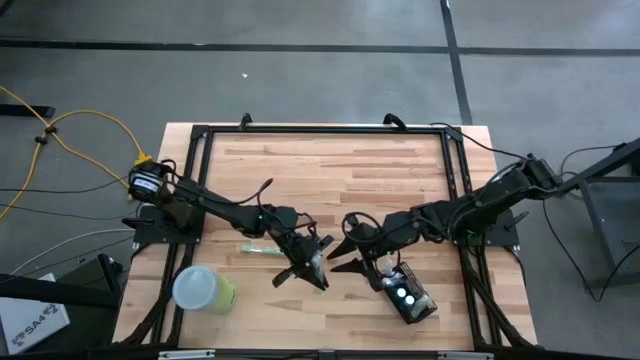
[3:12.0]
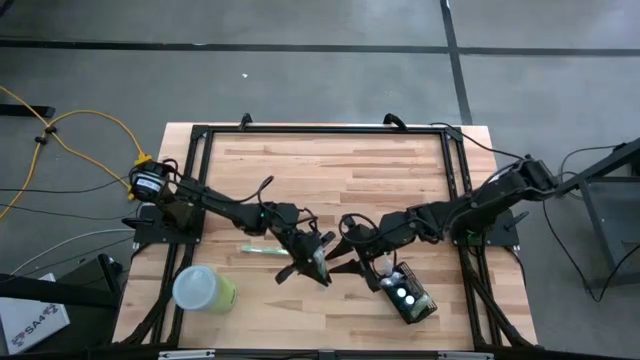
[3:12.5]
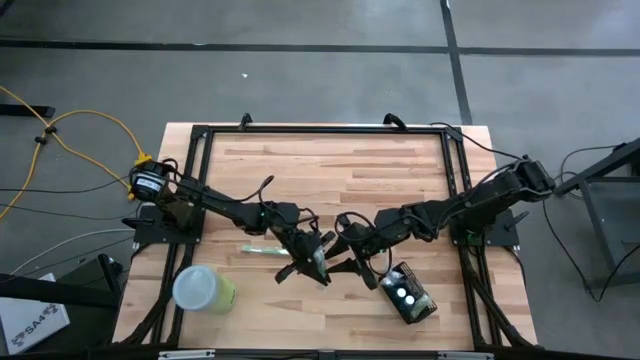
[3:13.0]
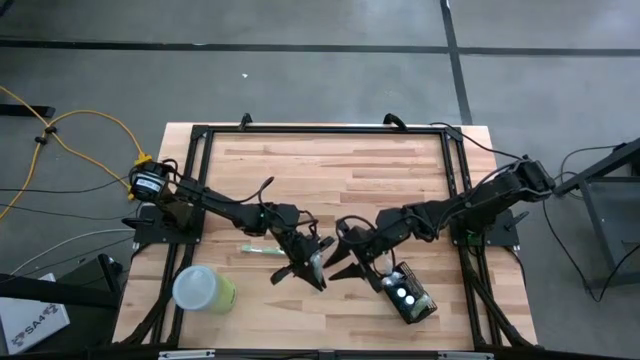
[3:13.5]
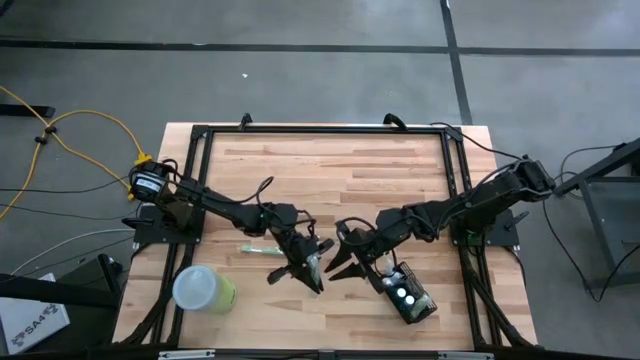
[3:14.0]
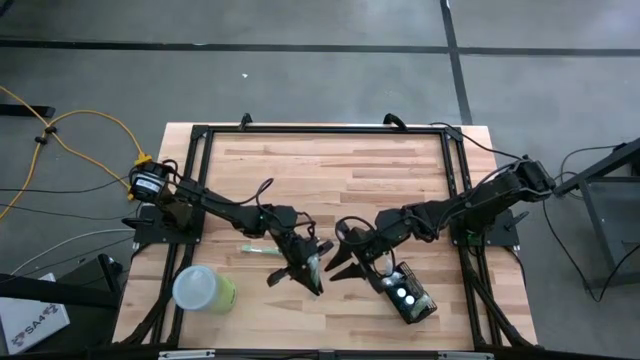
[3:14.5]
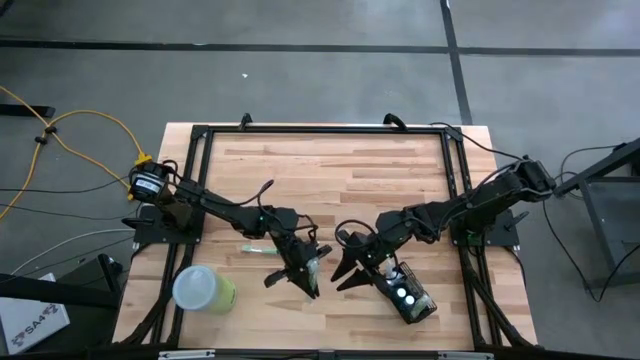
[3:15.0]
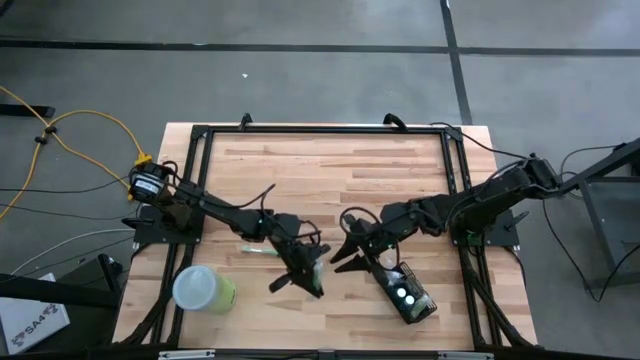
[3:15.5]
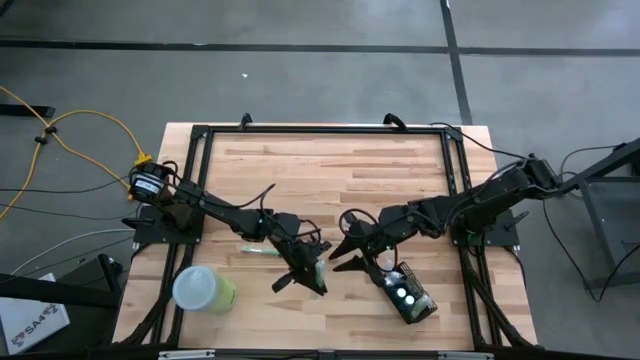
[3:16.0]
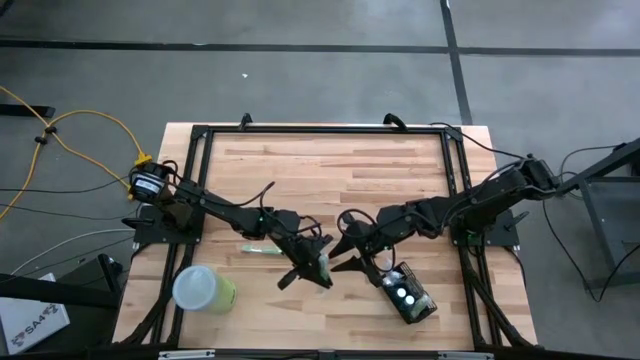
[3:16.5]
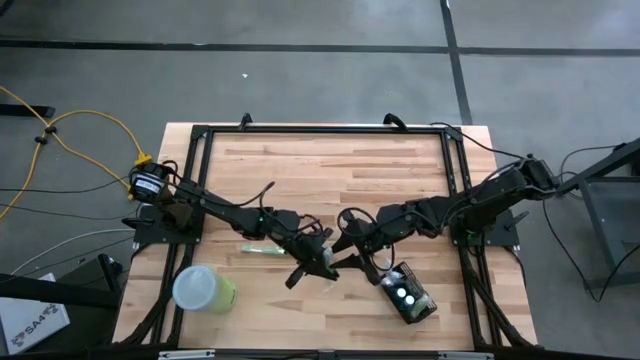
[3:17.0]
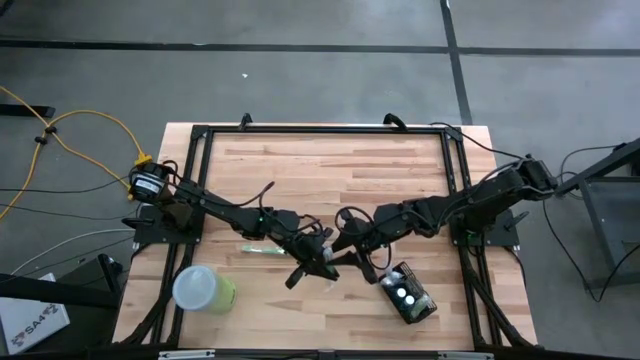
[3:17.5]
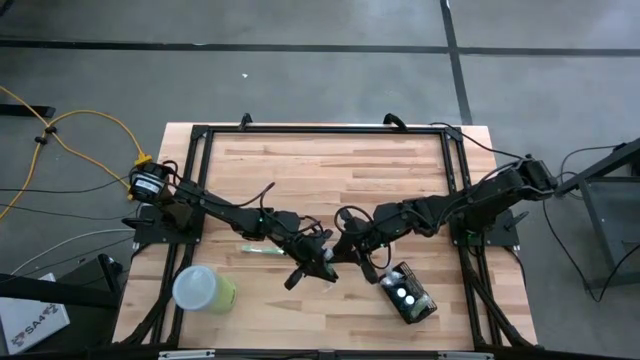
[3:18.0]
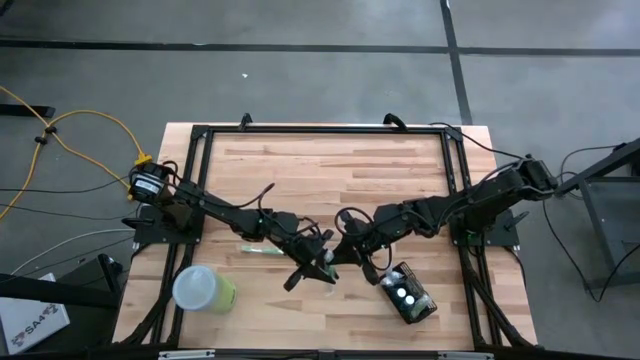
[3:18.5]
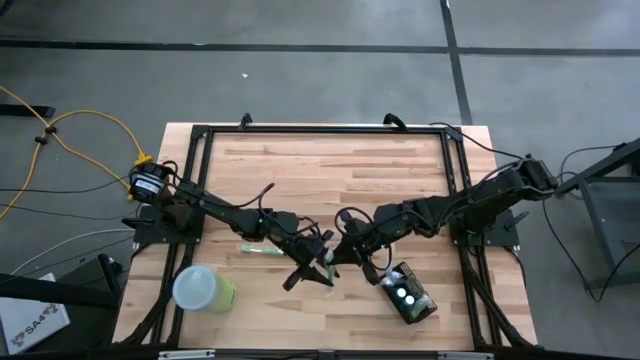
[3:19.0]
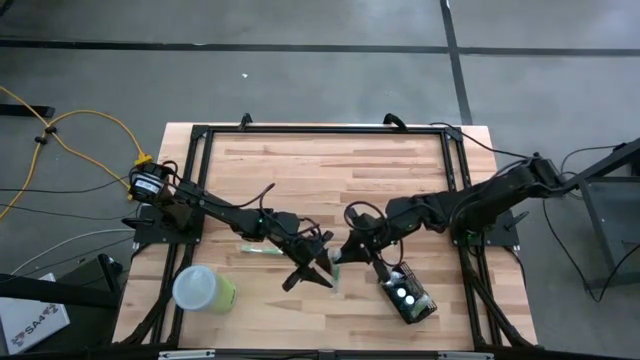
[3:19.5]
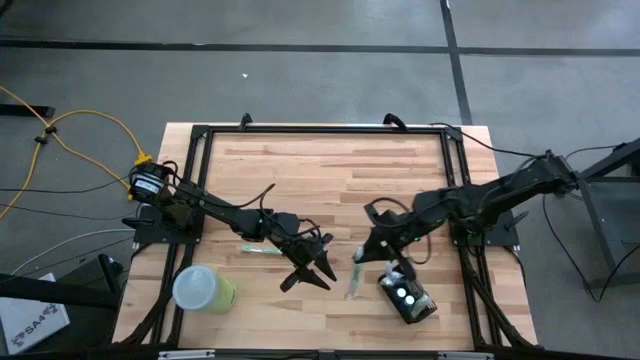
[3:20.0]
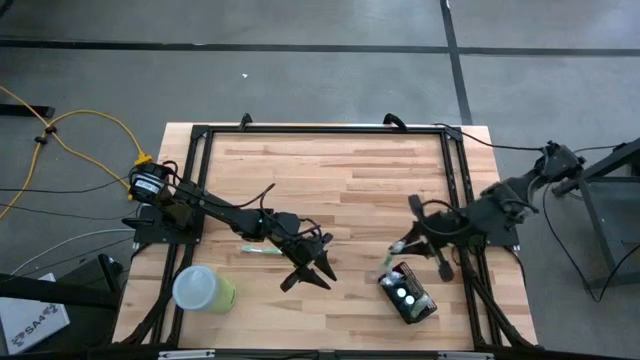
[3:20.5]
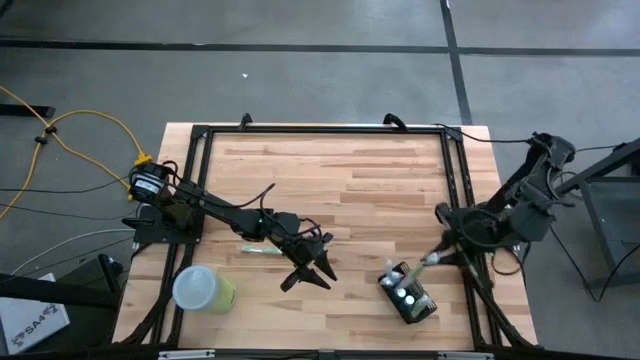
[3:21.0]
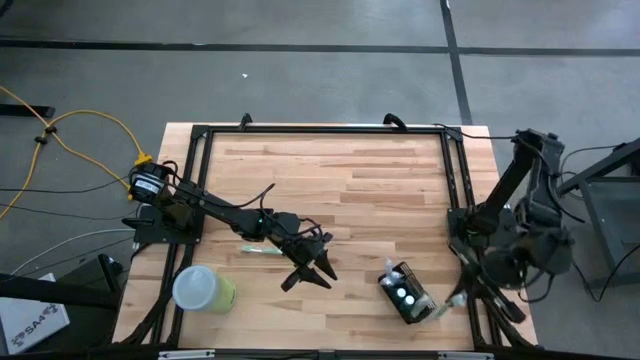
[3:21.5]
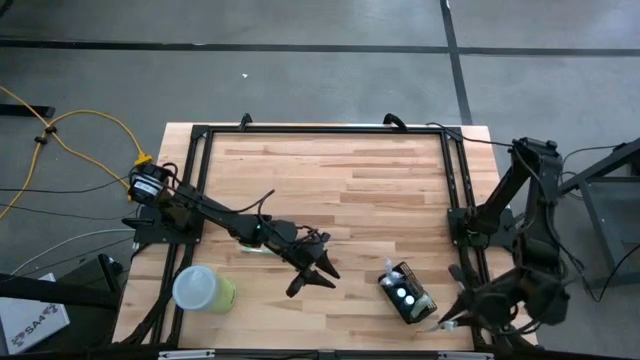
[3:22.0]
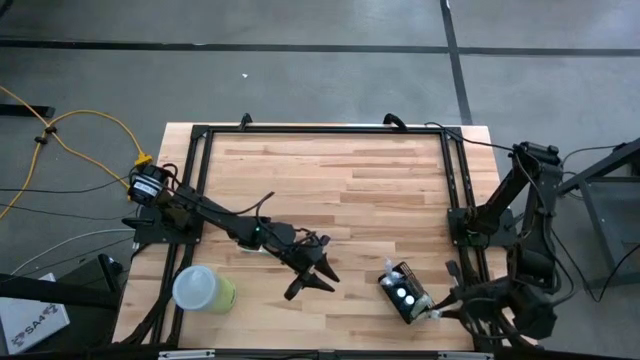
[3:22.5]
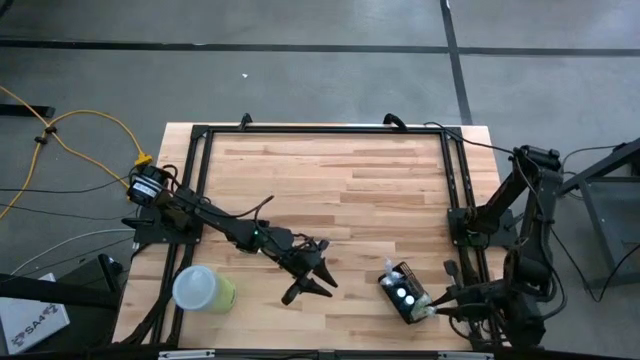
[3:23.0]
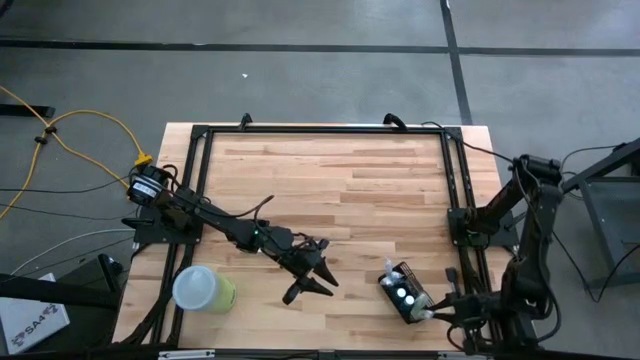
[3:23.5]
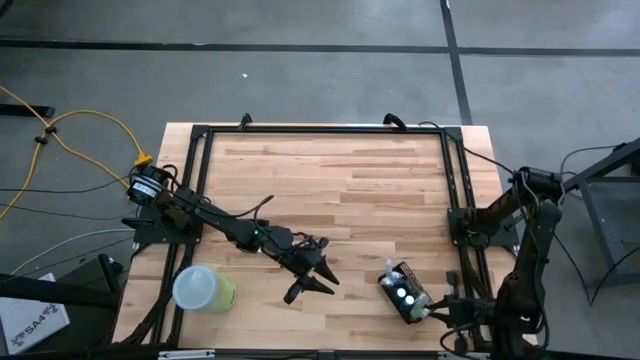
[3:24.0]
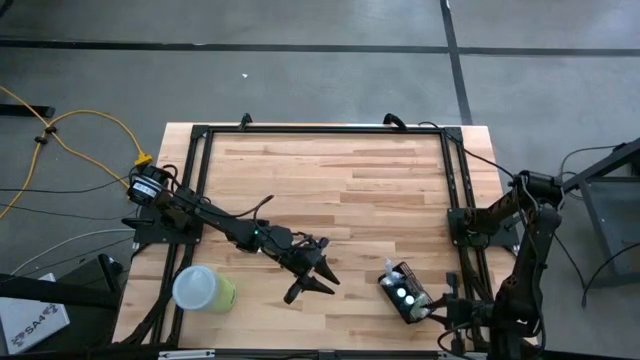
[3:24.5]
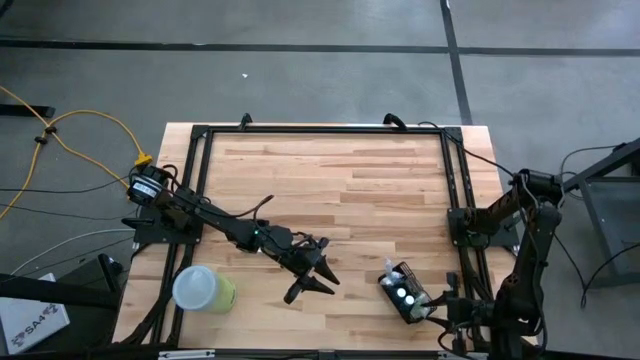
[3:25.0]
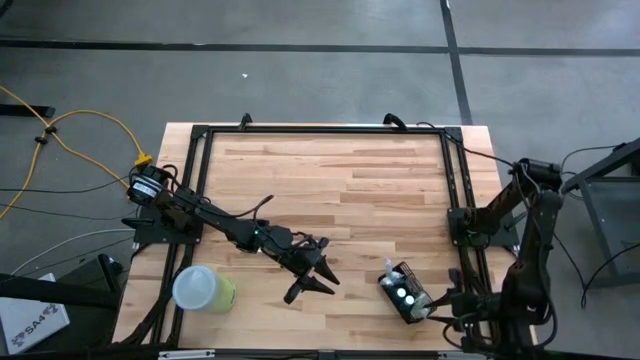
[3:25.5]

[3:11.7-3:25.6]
Task: Pick & Place toothbrushing station
Put the top green toothbrush into the bottom section of the black wire organizer

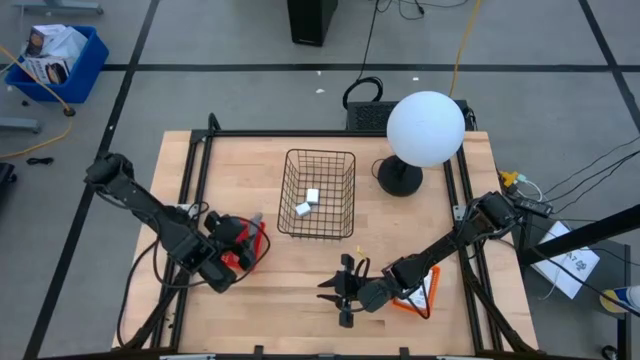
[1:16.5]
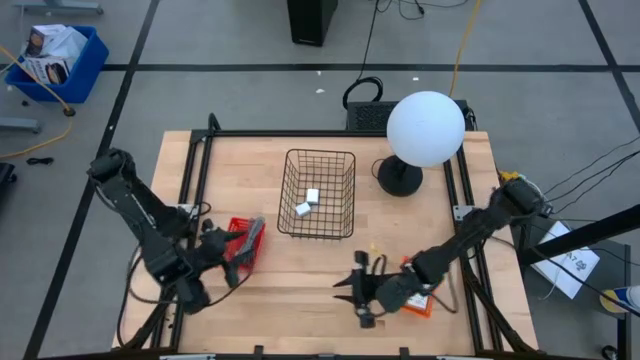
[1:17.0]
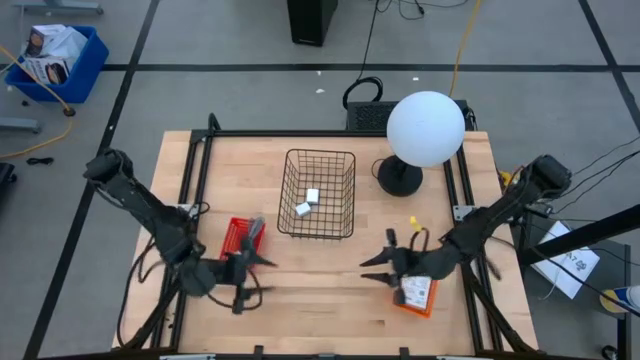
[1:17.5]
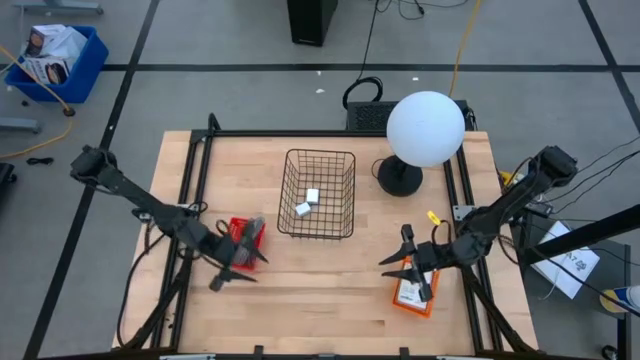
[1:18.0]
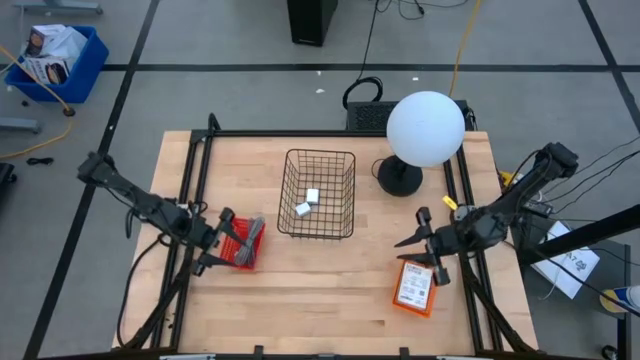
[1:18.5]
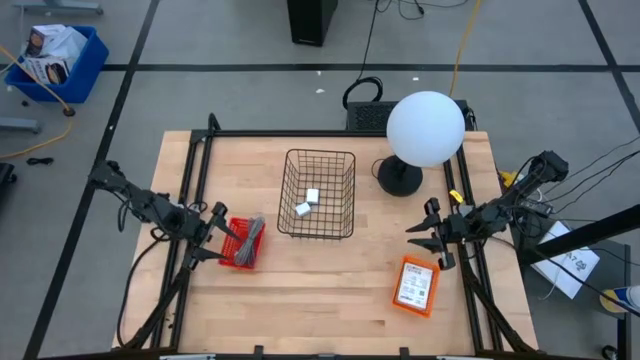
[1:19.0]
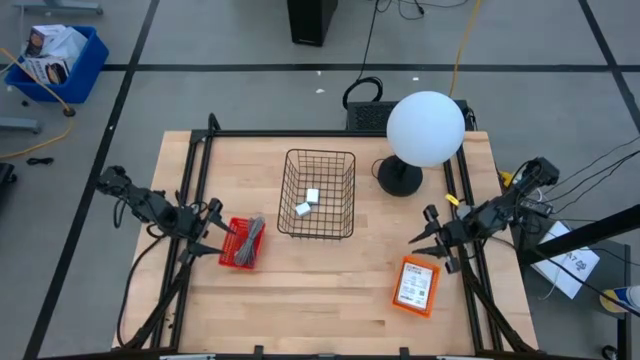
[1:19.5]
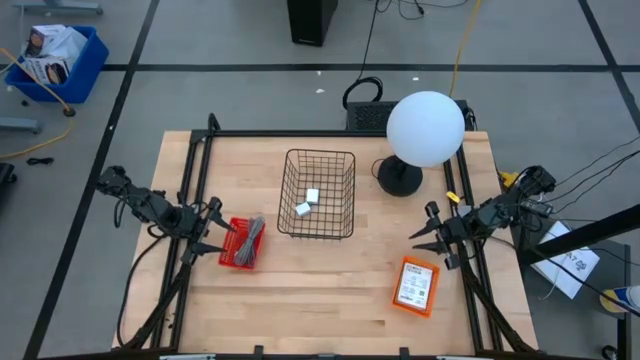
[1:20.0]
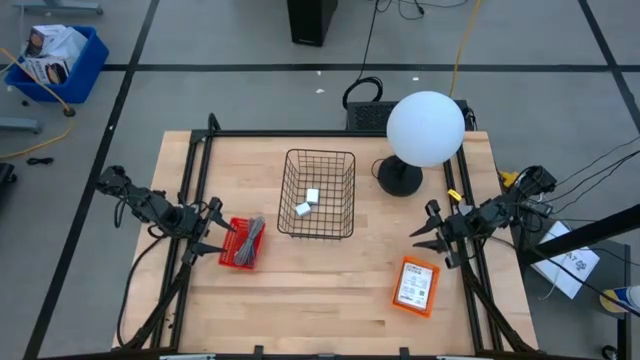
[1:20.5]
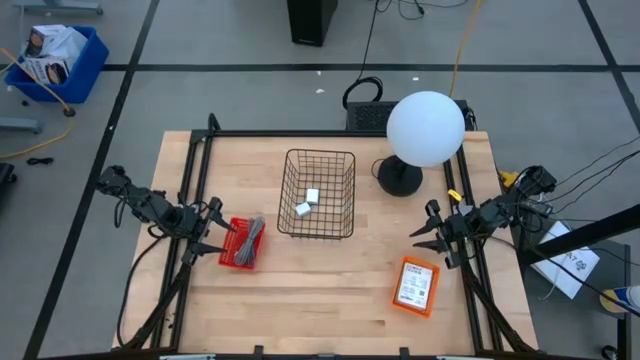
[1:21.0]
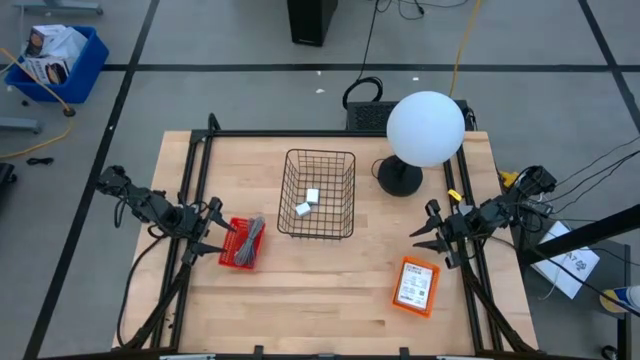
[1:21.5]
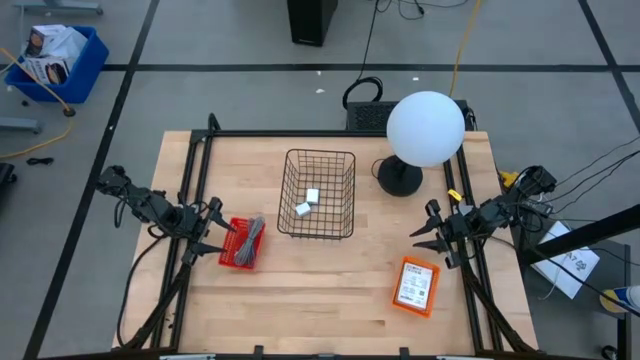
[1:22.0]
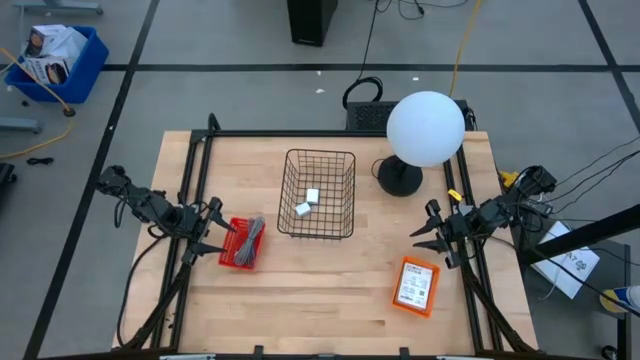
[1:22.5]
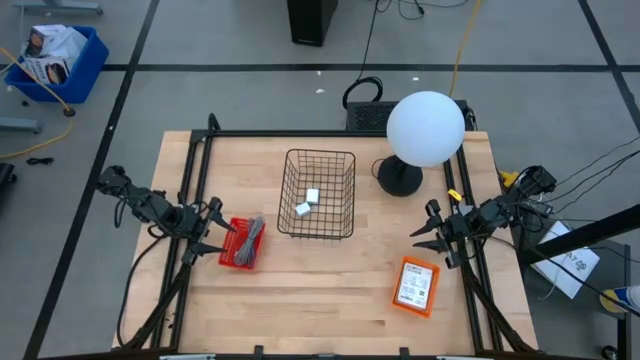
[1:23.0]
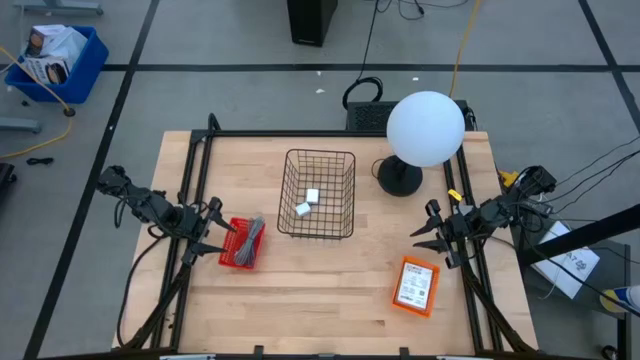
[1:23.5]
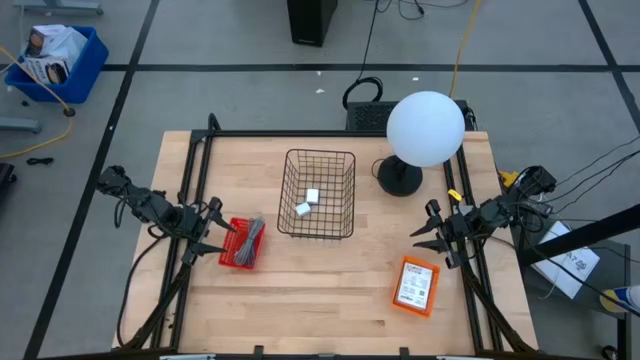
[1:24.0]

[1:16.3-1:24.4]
Task: Pick and place items into bin
Return to Home Position
